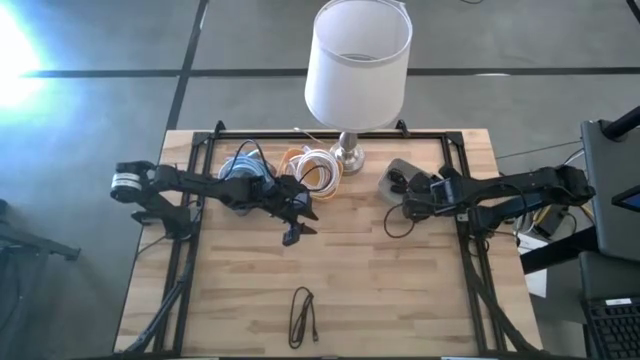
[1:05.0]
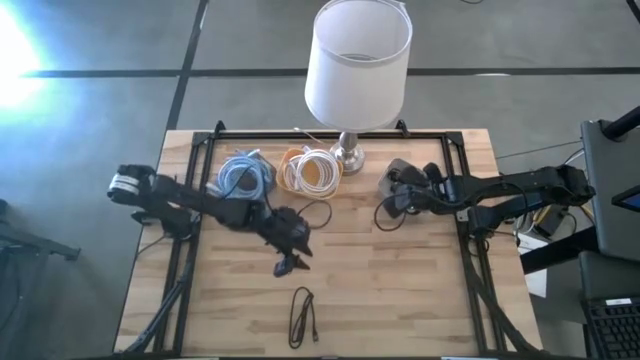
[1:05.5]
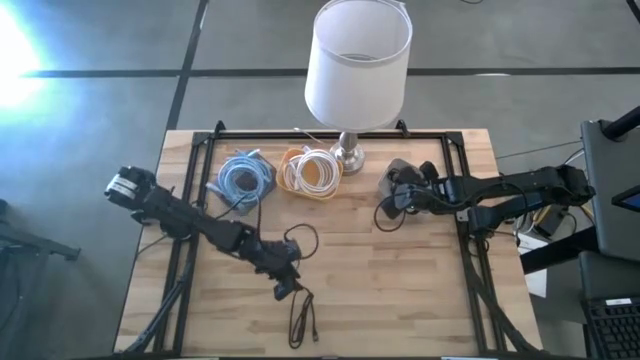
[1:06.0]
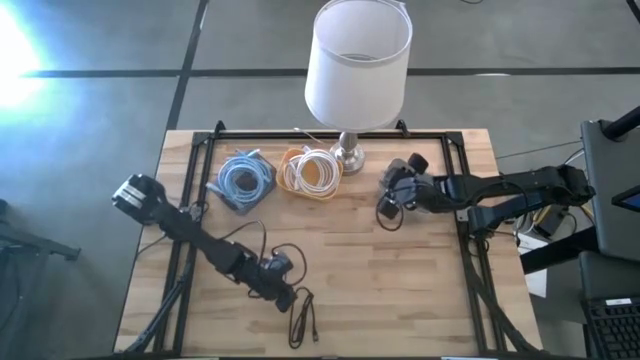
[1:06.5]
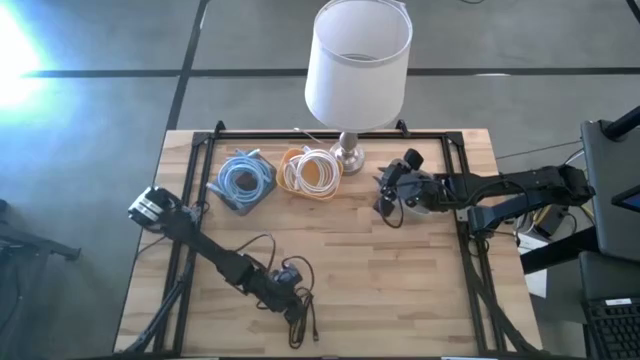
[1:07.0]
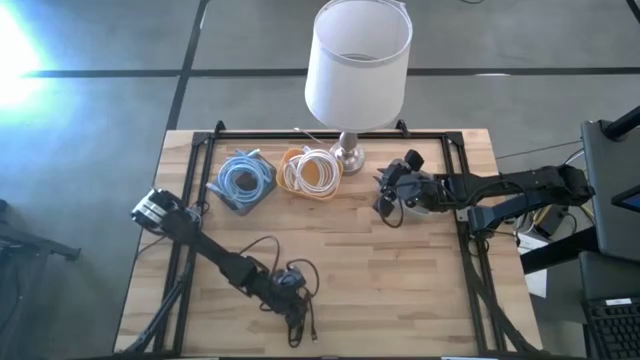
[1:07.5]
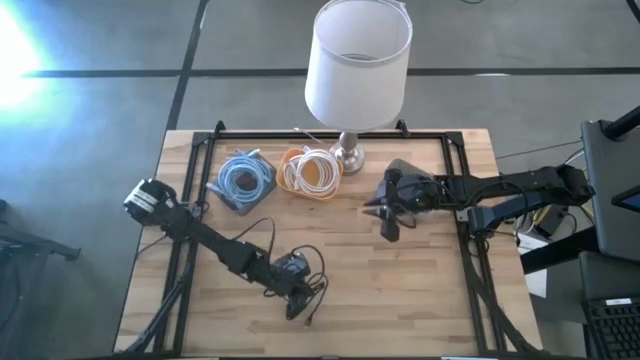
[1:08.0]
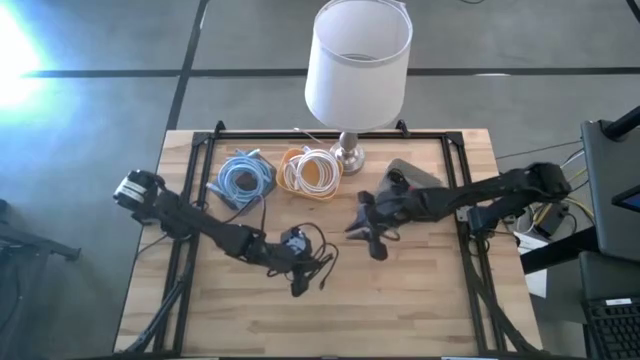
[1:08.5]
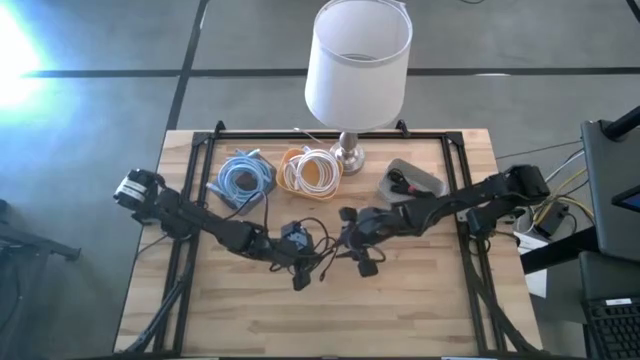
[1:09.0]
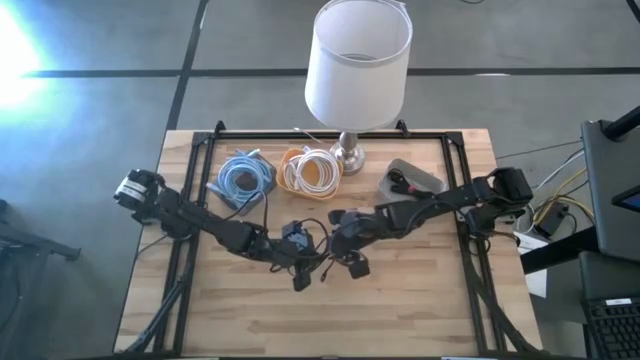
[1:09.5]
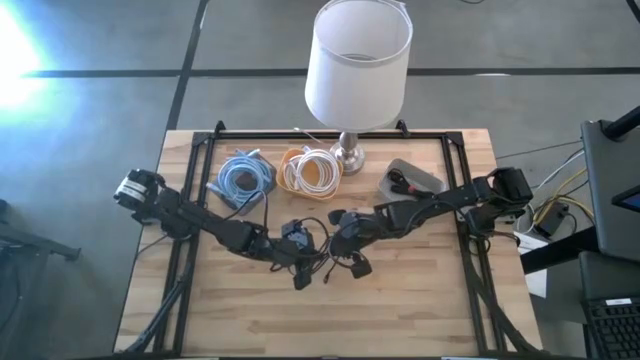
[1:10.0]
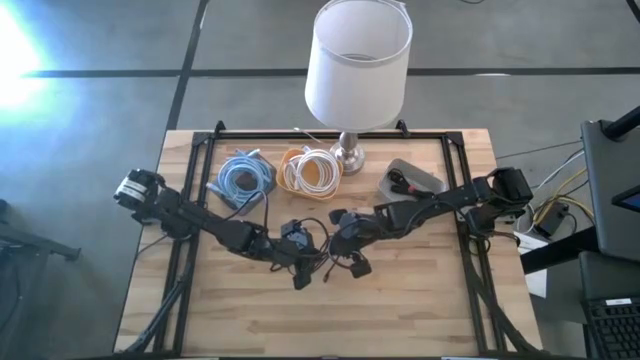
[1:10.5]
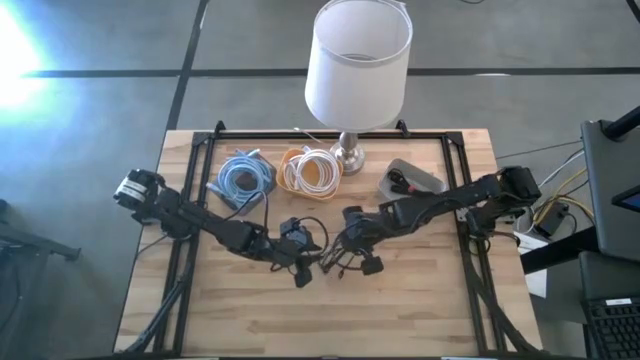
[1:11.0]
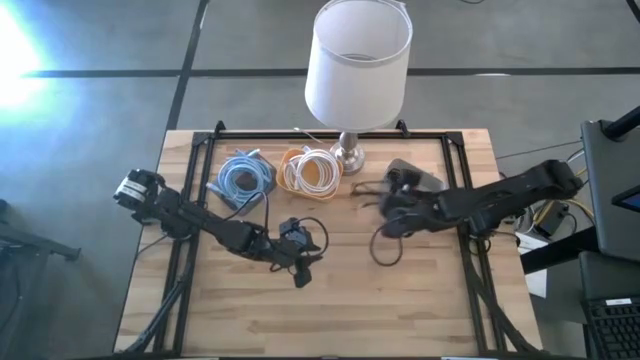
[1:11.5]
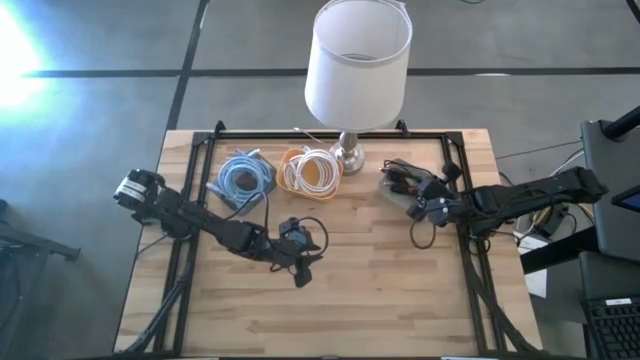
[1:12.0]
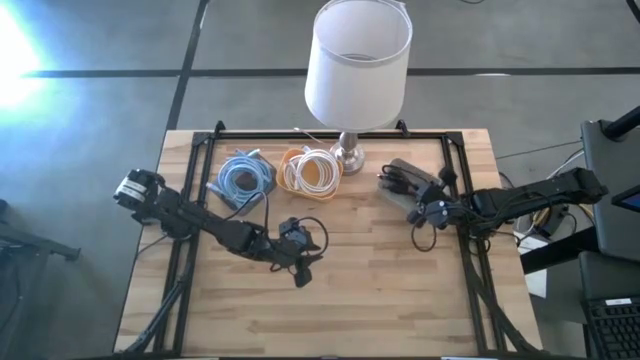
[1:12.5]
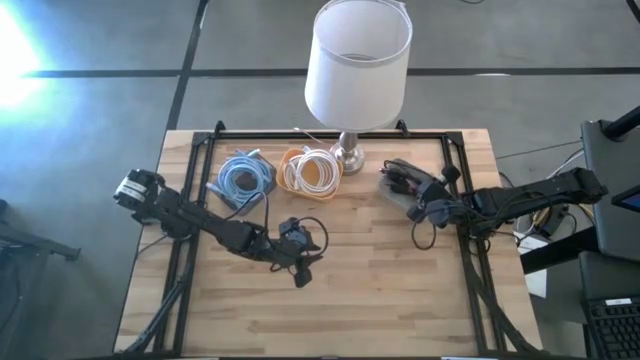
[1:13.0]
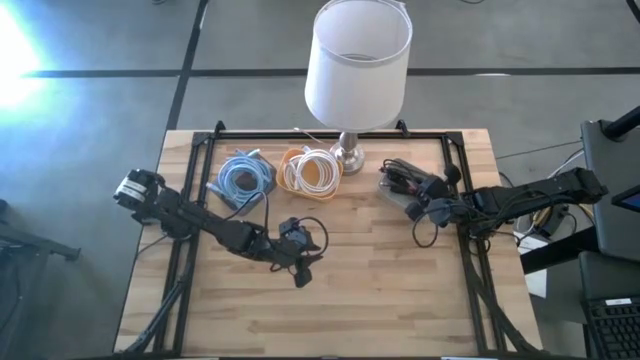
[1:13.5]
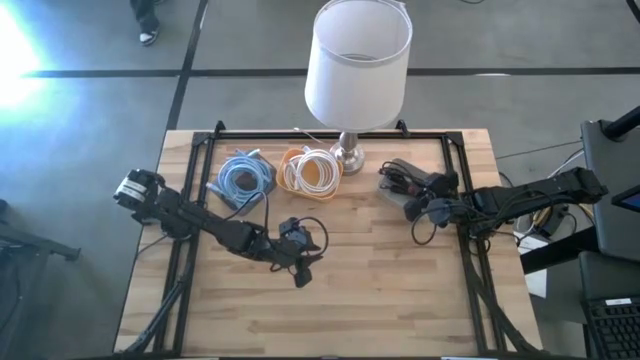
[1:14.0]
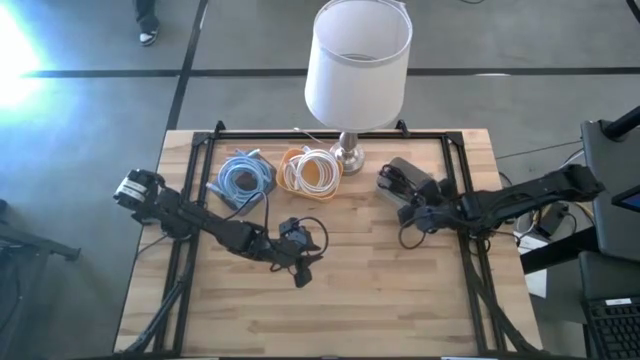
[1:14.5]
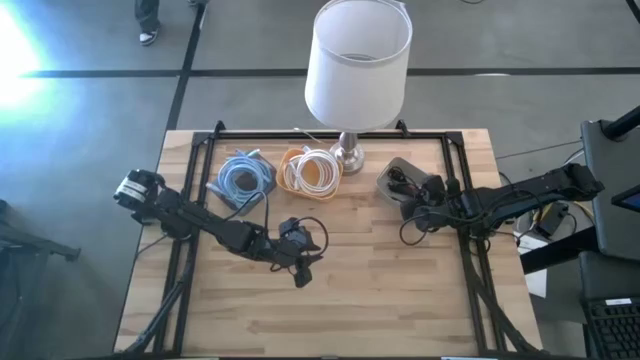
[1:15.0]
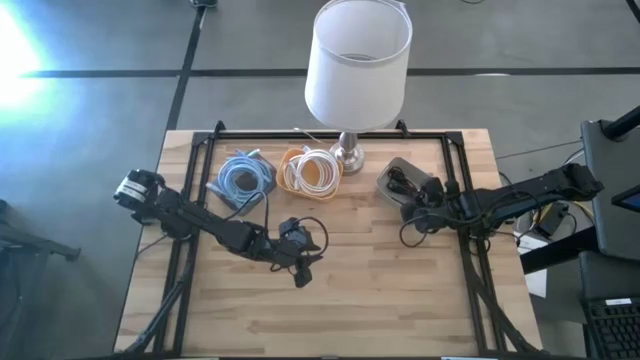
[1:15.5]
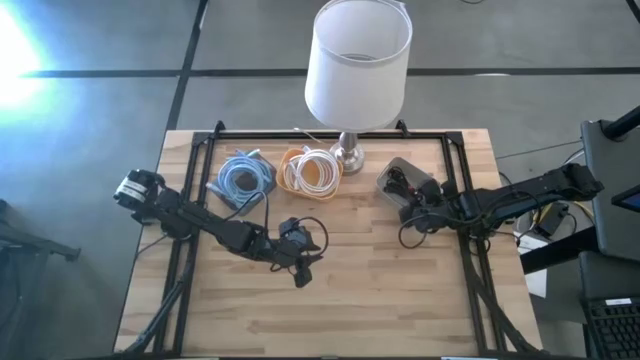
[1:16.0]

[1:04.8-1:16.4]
Task: Sort HDMI cables
Put the black HDMI cable into the gray bin

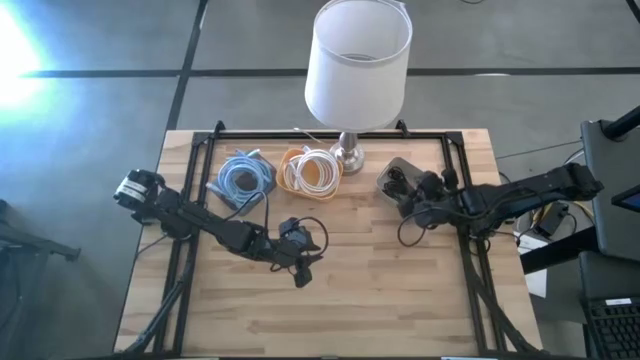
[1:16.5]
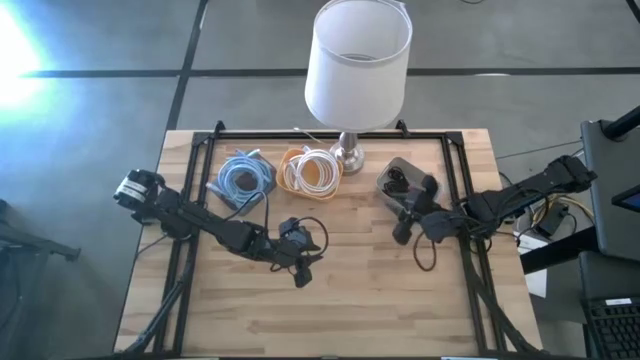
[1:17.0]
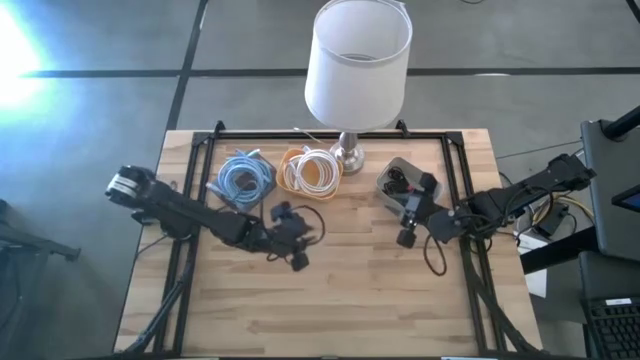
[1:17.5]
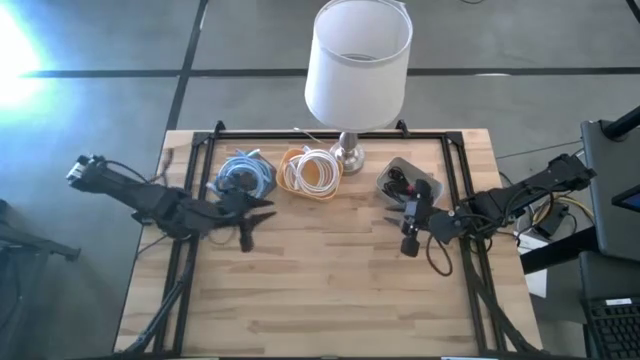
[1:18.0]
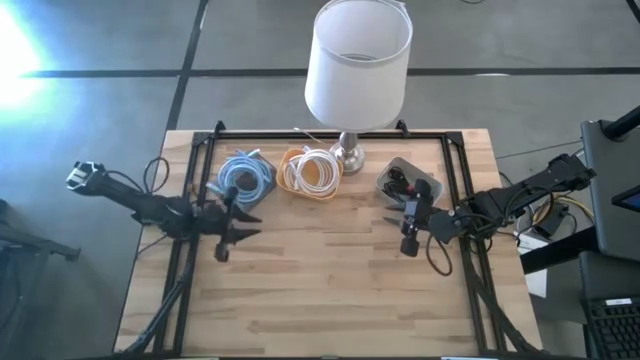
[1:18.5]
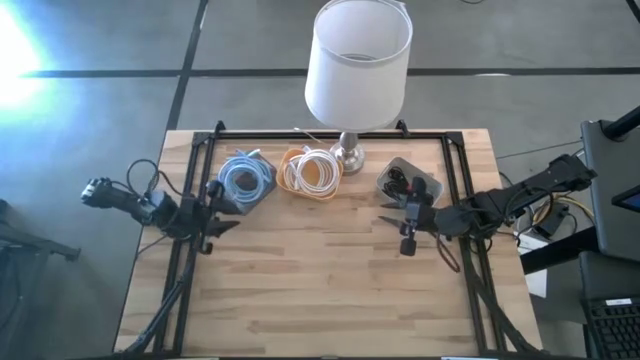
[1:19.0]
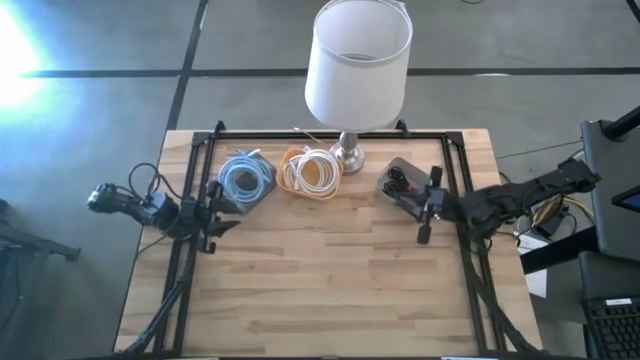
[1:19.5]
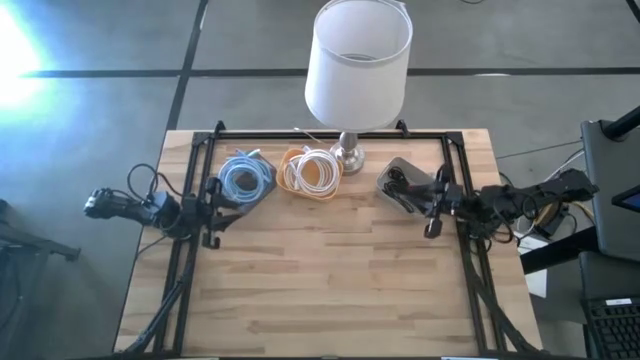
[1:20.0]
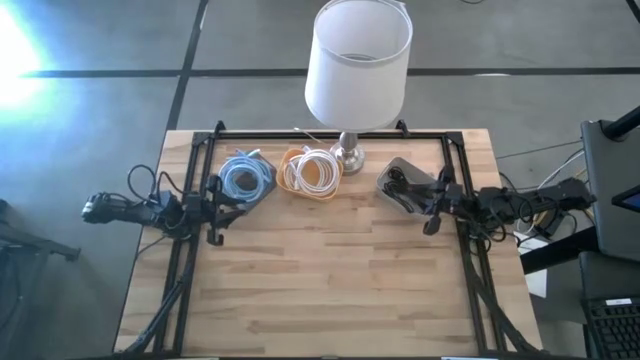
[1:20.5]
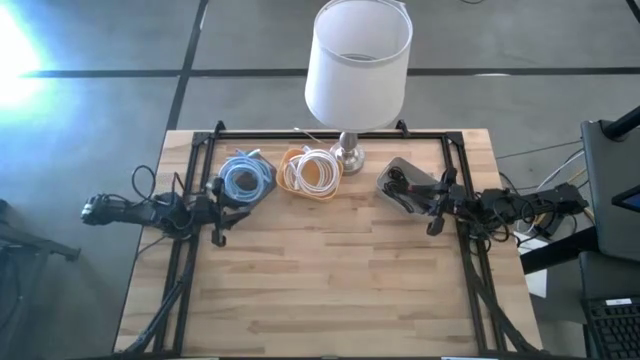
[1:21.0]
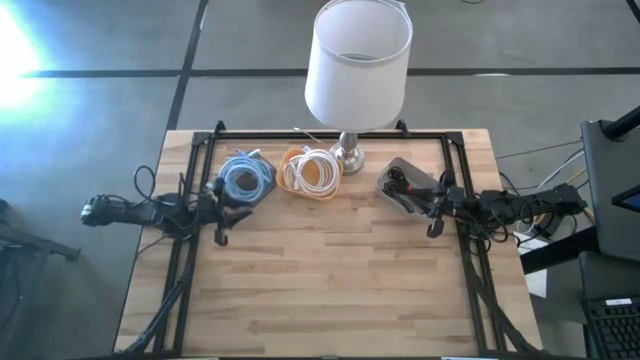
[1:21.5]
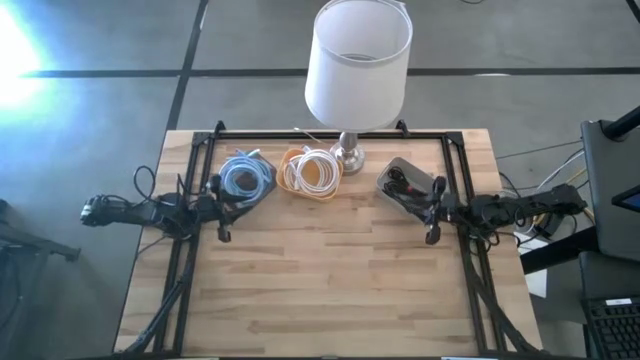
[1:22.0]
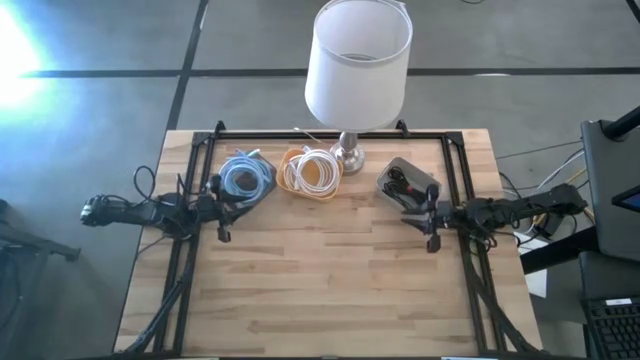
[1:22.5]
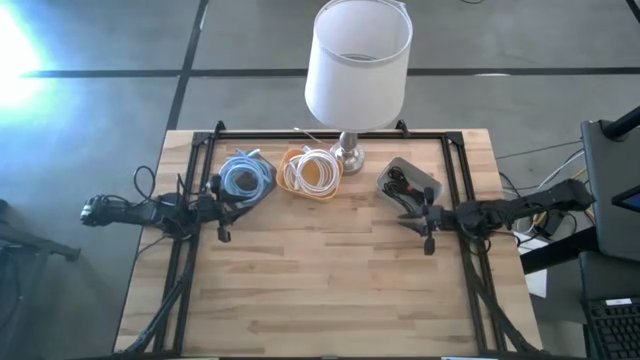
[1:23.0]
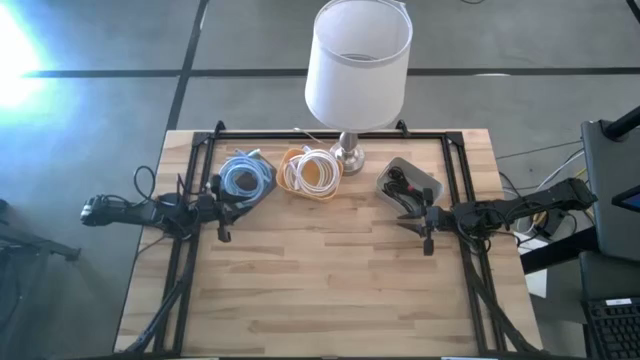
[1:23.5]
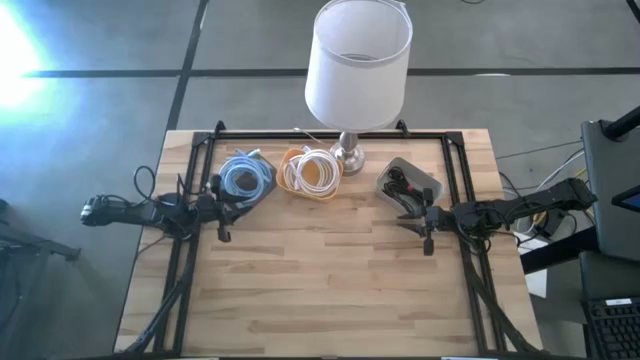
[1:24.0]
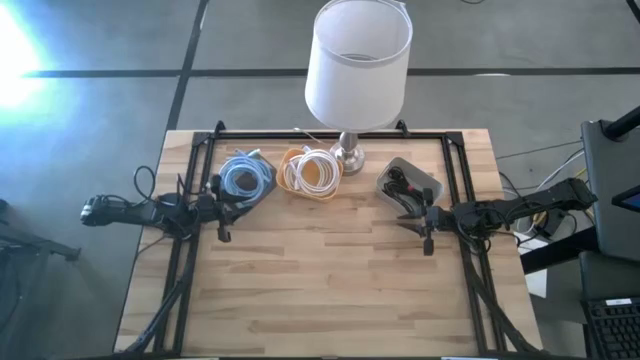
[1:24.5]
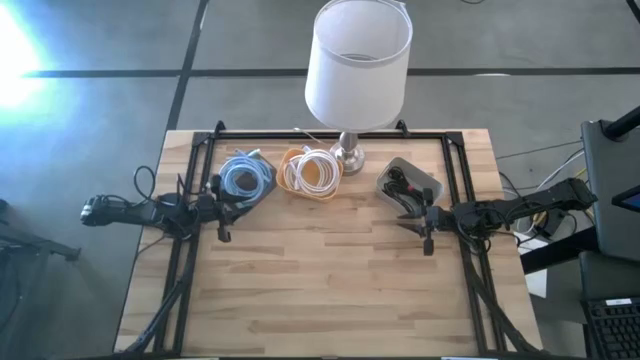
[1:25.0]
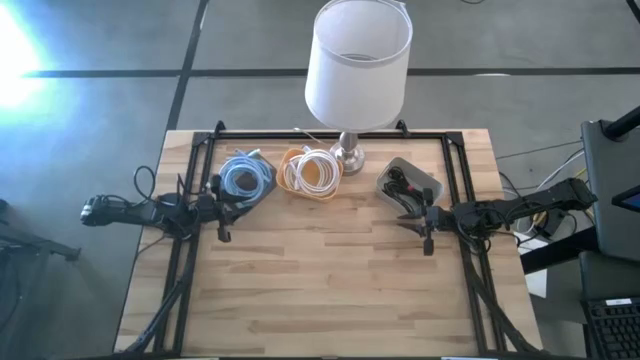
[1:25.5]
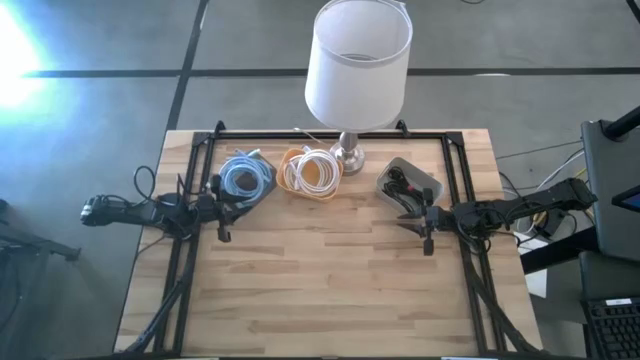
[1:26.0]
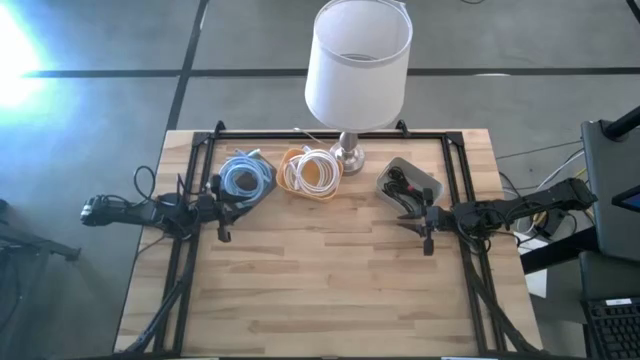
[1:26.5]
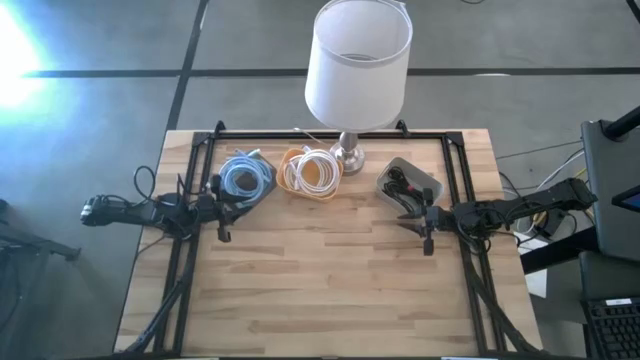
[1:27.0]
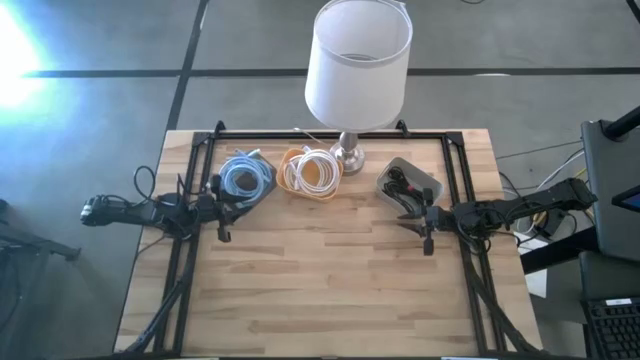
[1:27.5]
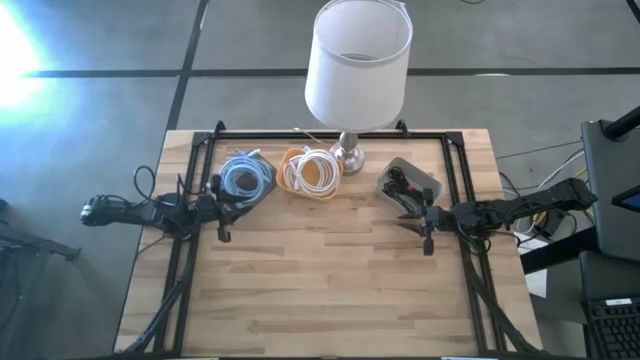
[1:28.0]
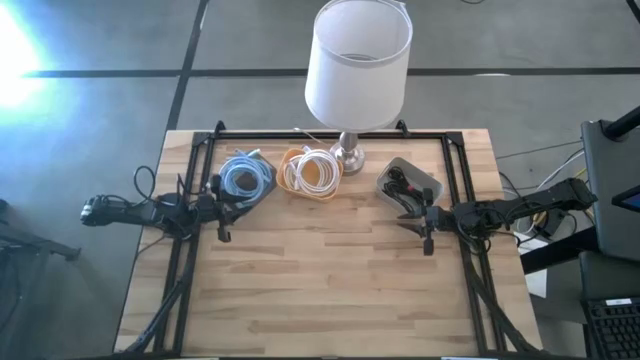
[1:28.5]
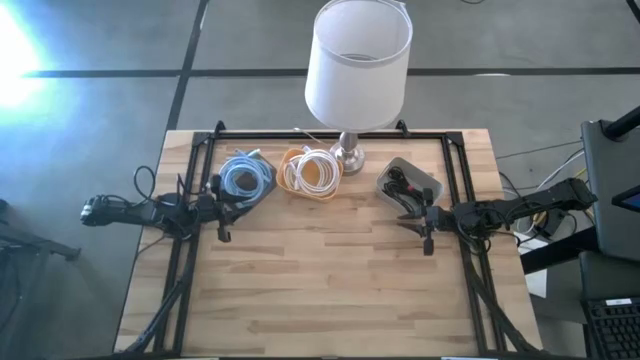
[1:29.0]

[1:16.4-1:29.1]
Return to Home Position
